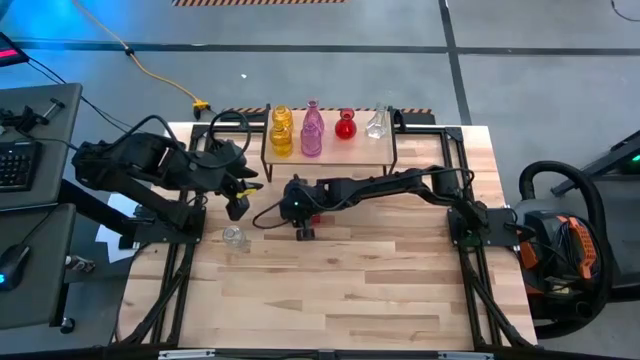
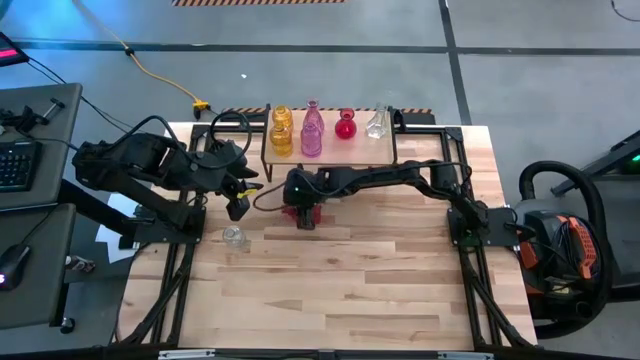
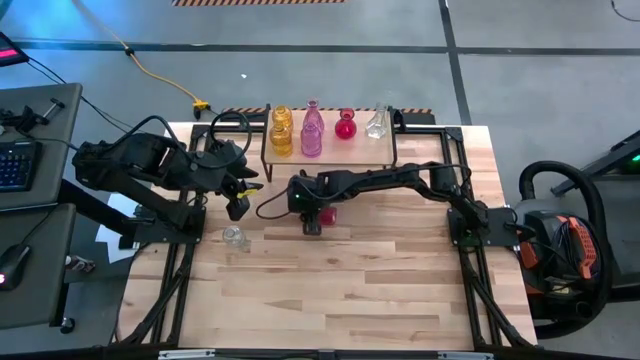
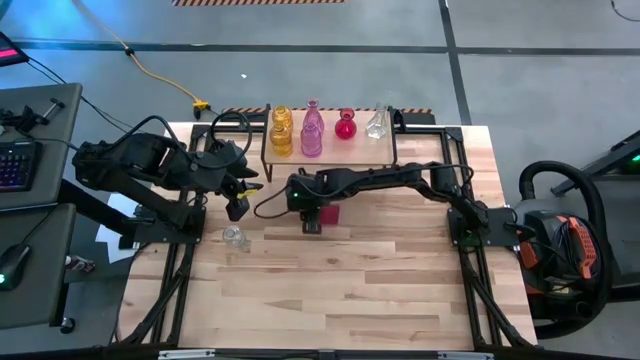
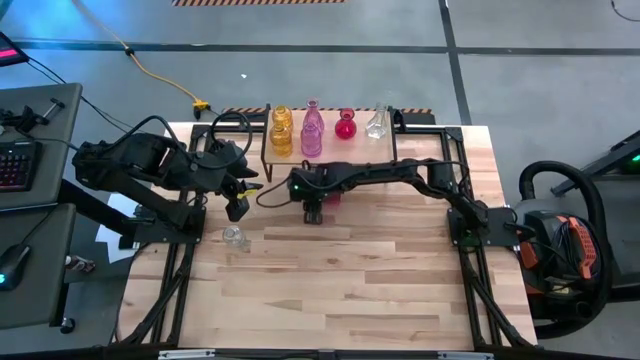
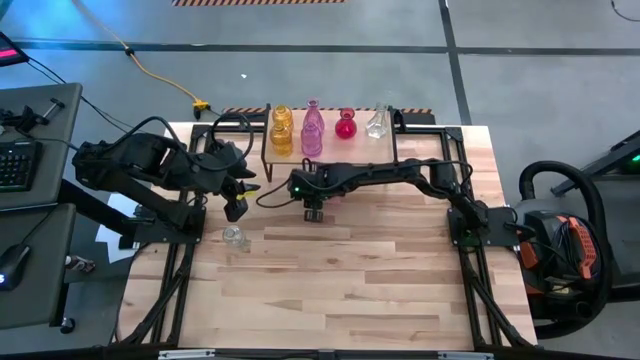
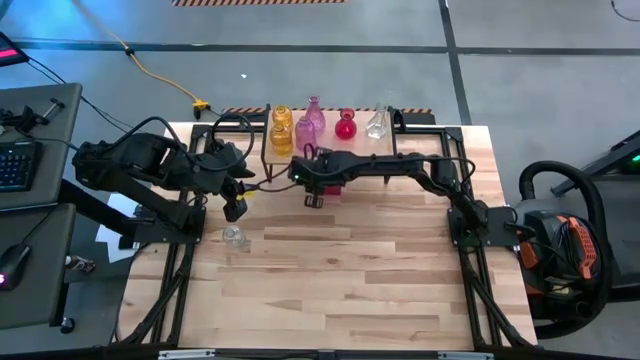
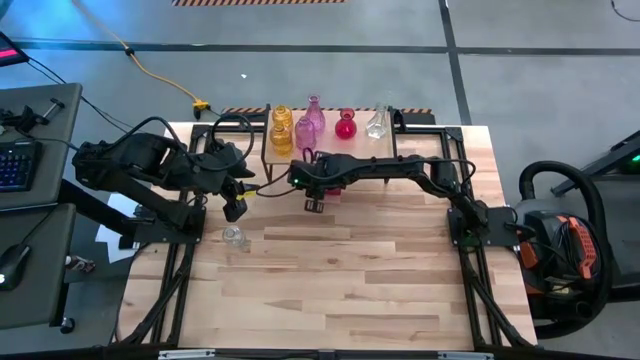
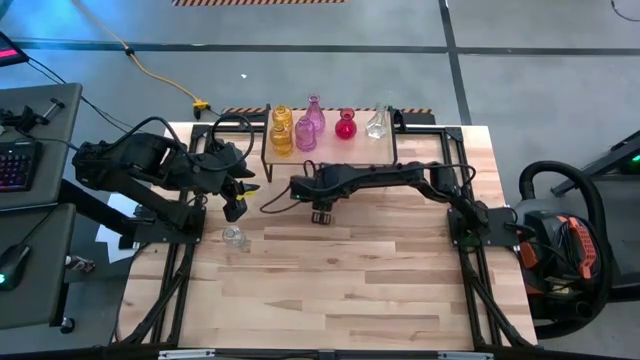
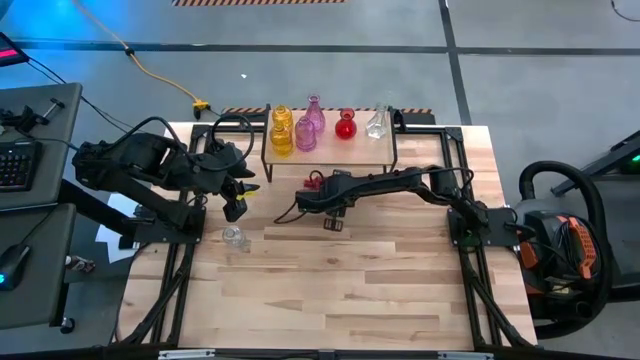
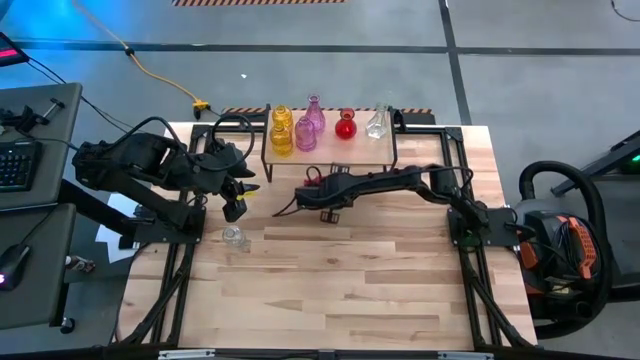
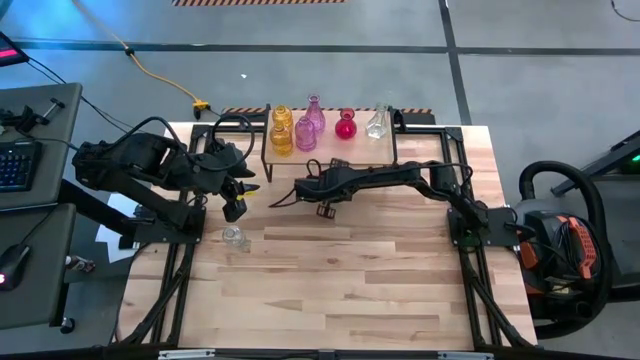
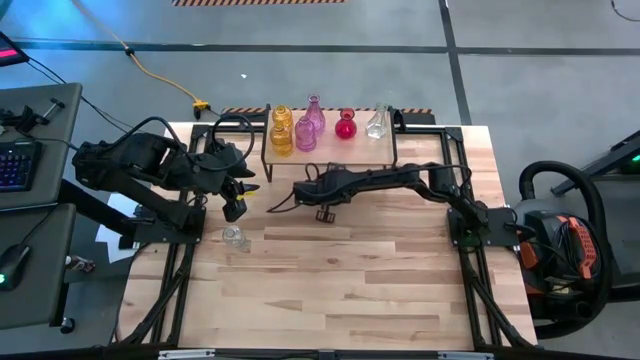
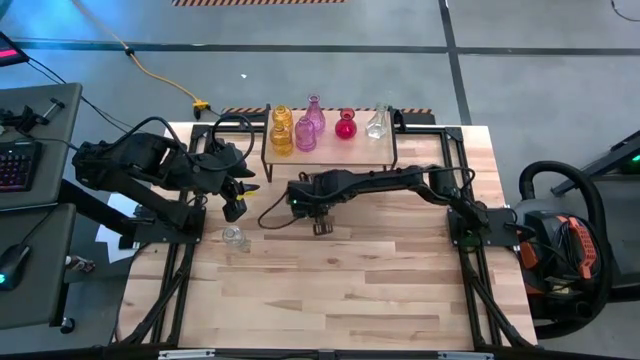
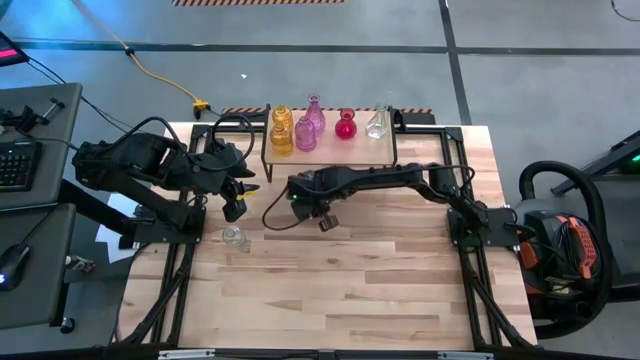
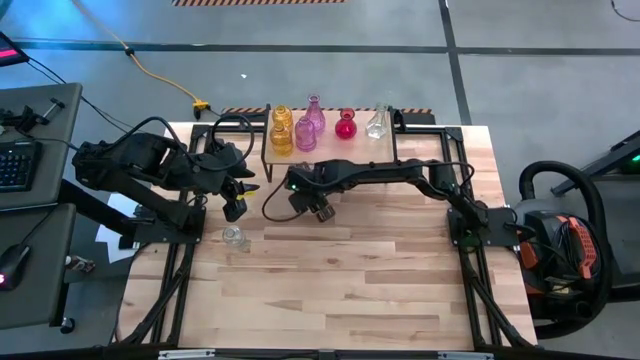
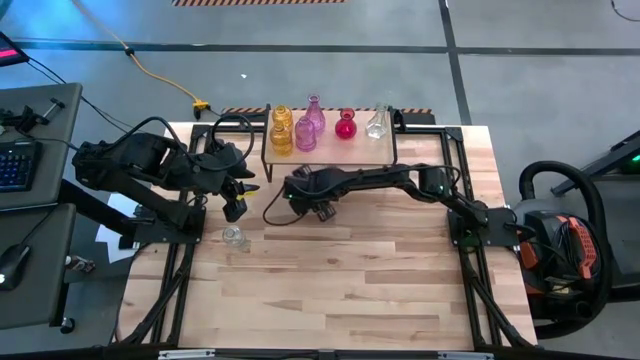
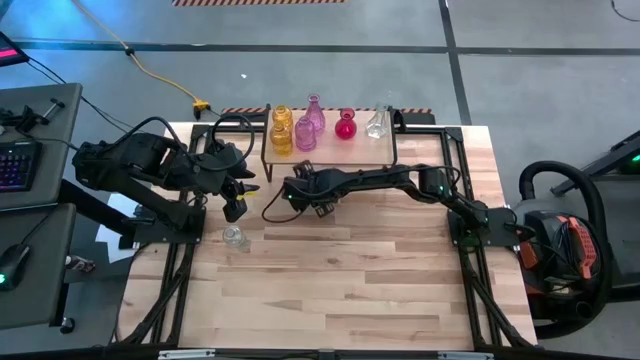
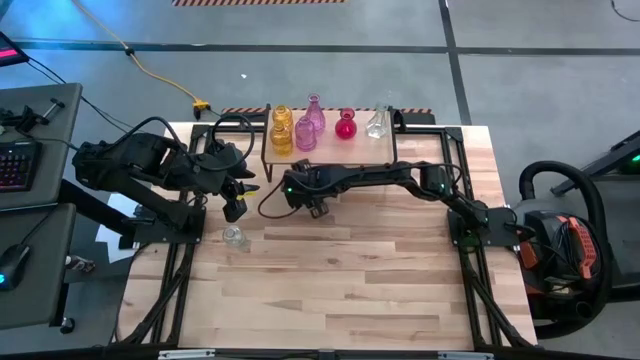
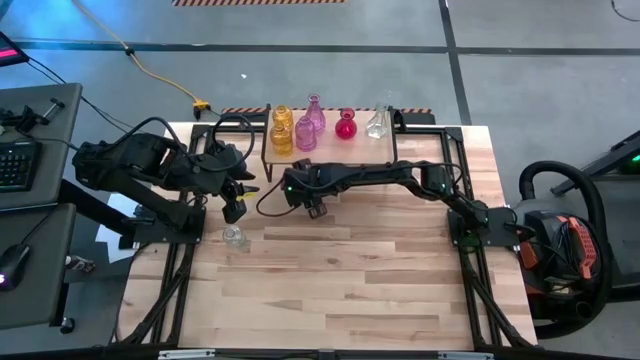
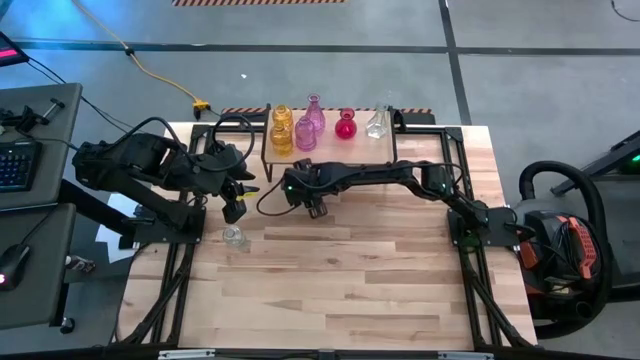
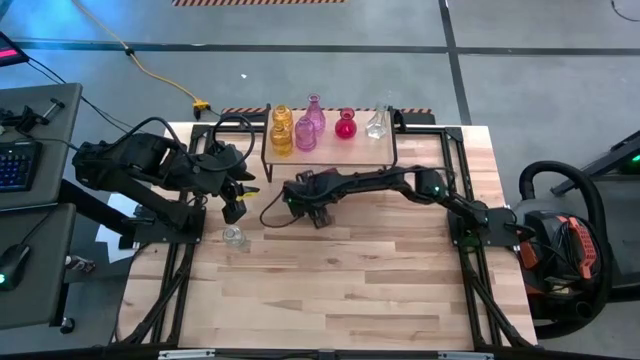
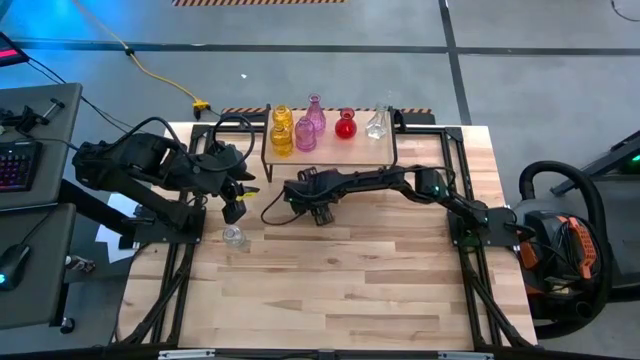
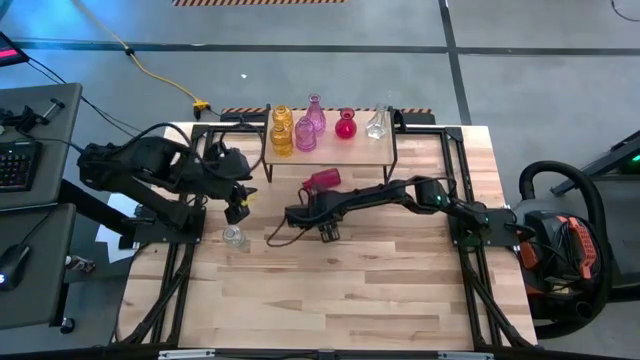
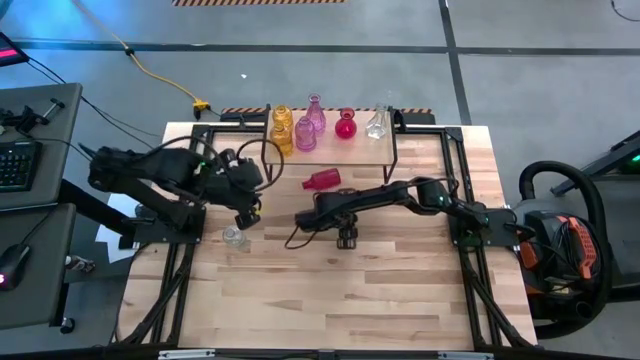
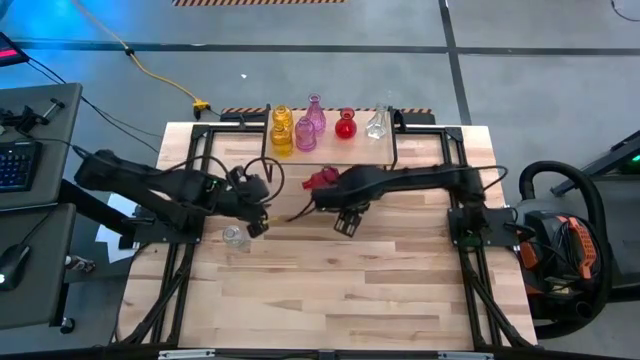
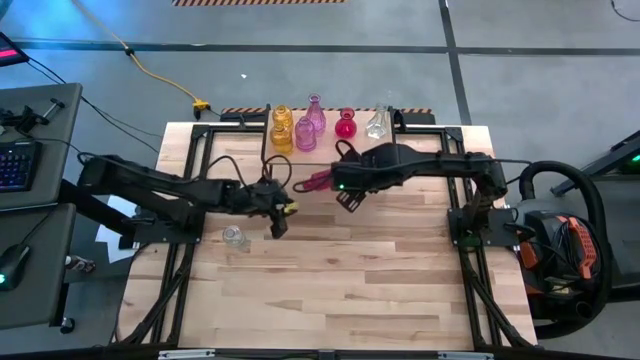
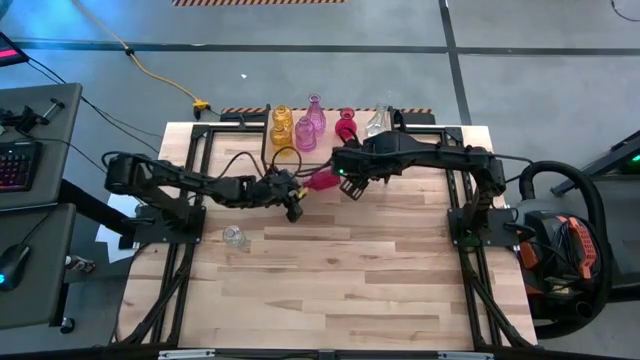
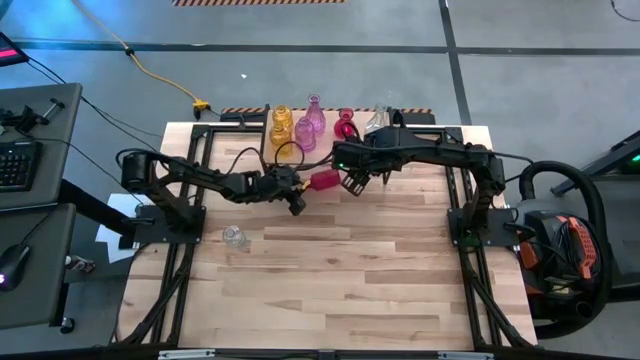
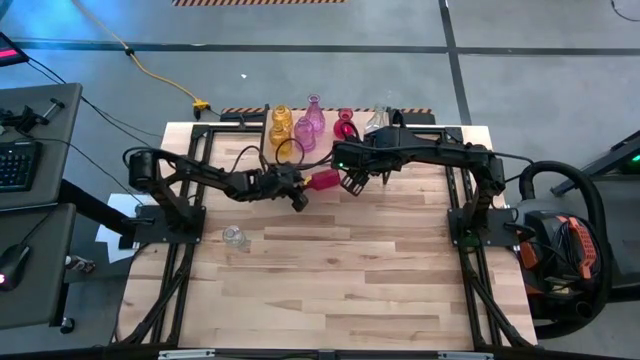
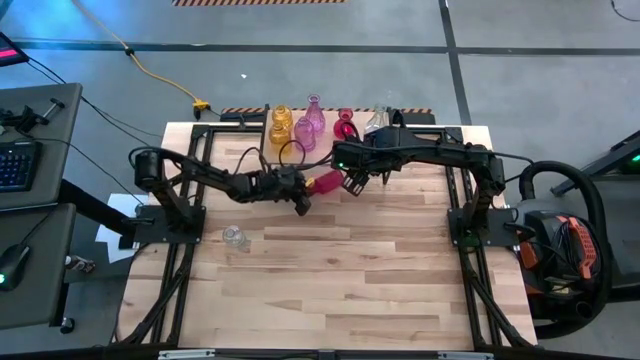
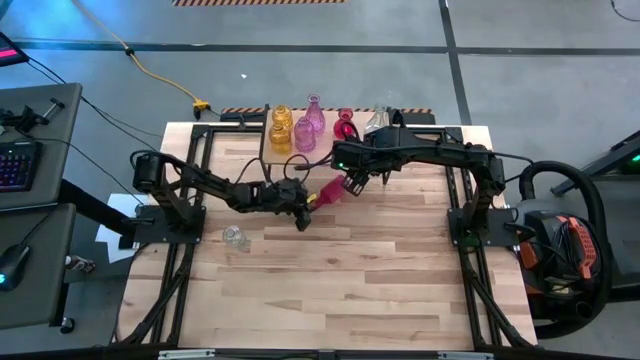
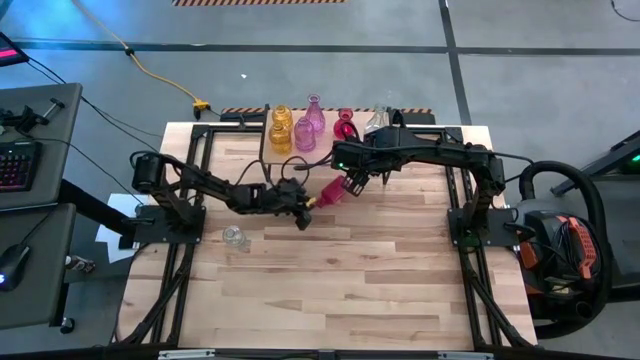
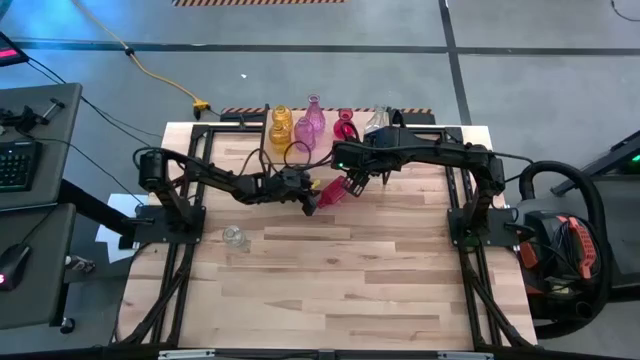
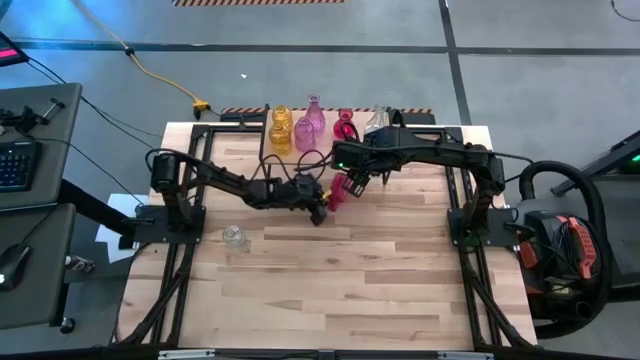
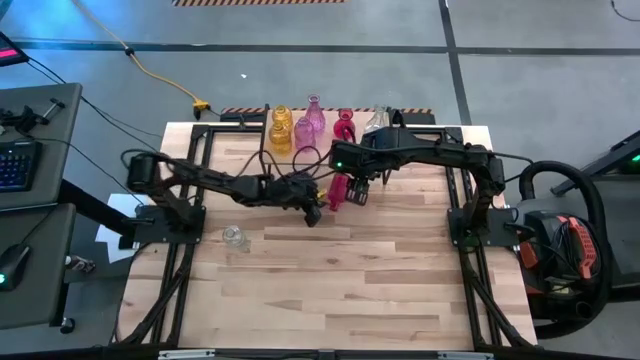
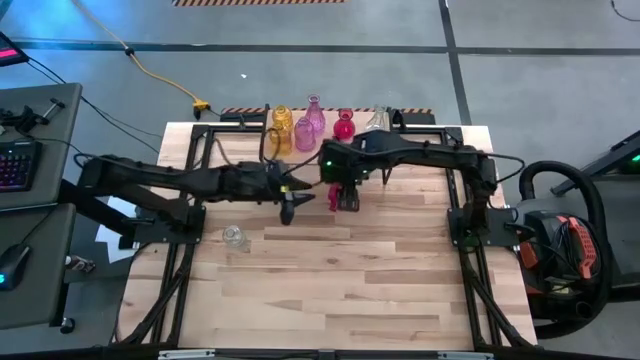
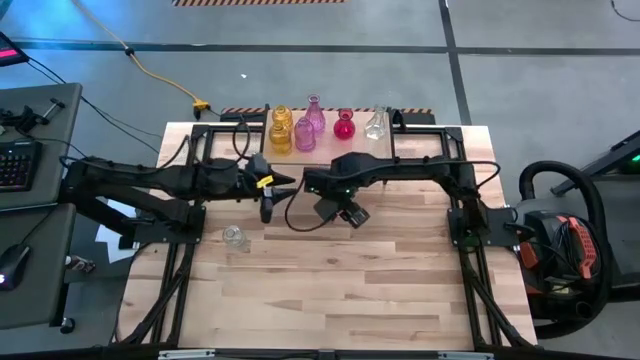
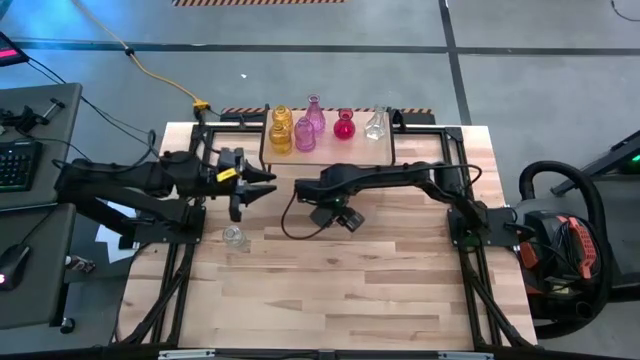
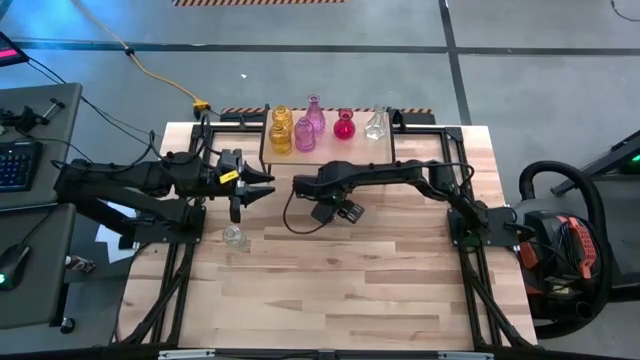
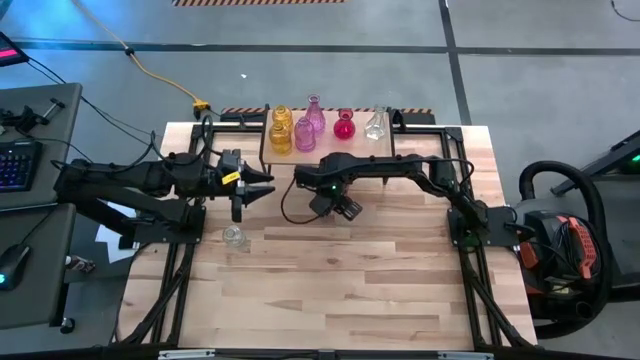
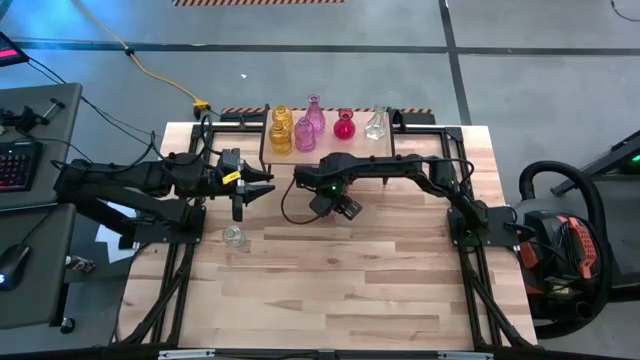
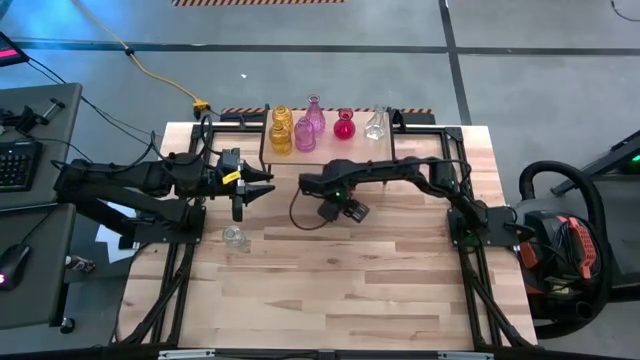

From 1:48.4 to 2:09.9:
Task: sort vases onto shelf
Put the red vase on the shelf
